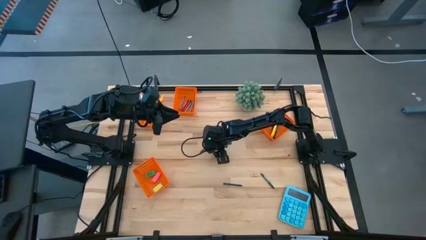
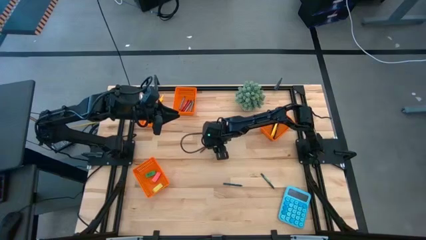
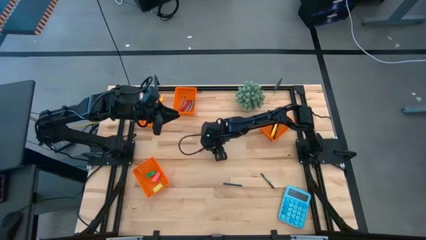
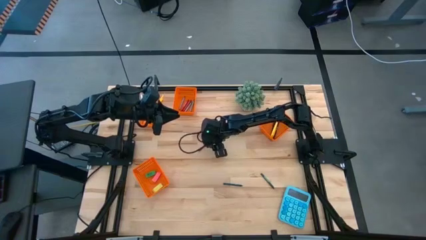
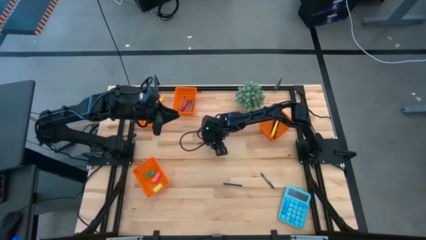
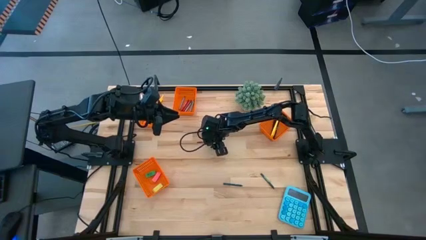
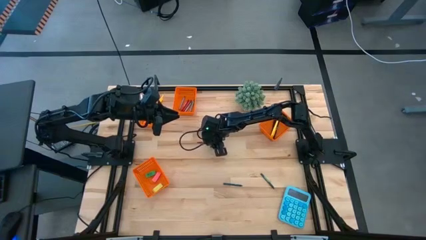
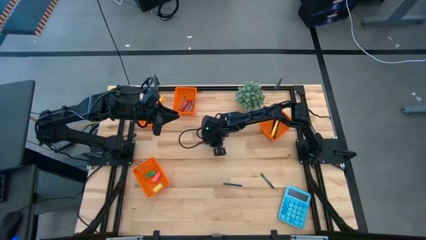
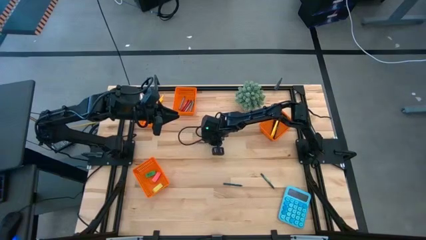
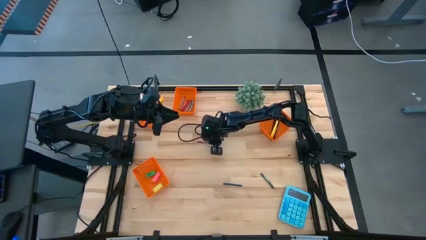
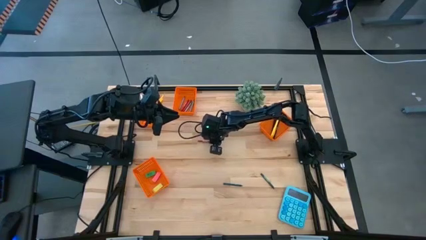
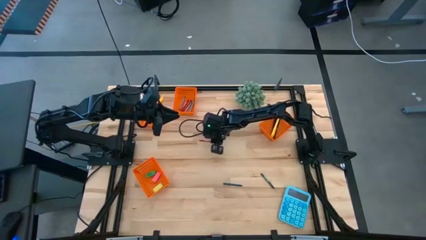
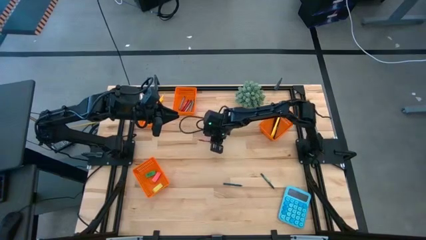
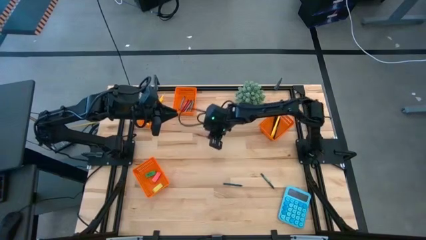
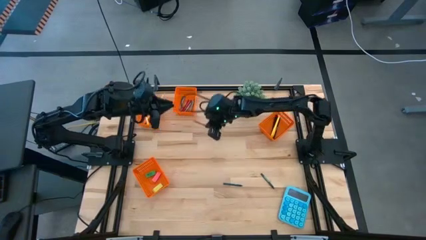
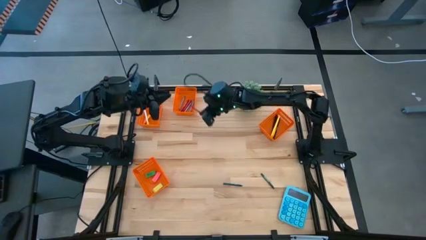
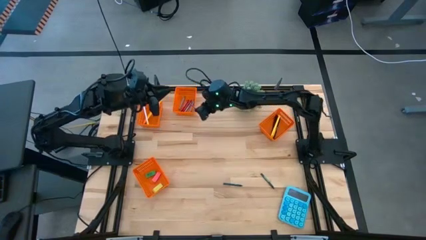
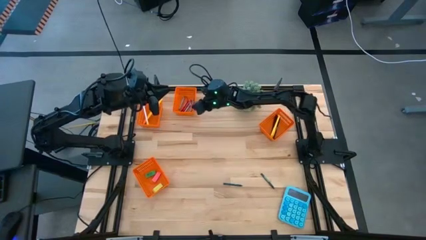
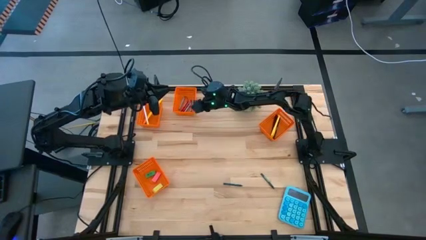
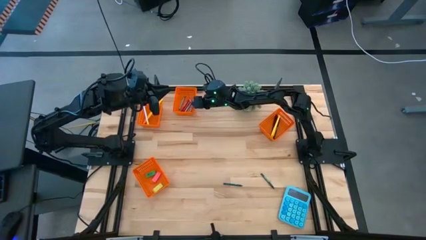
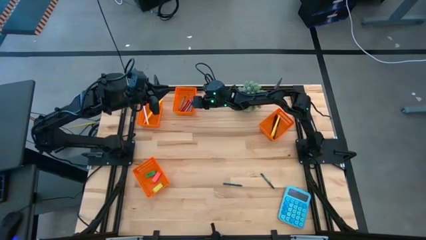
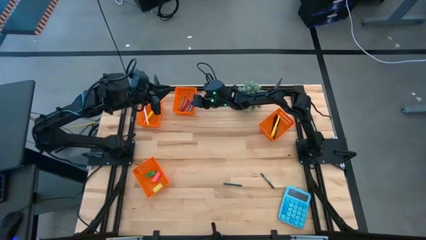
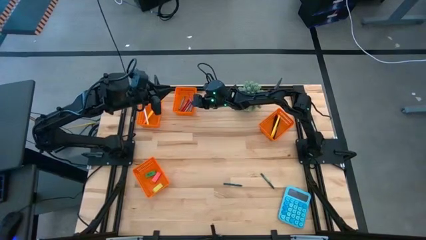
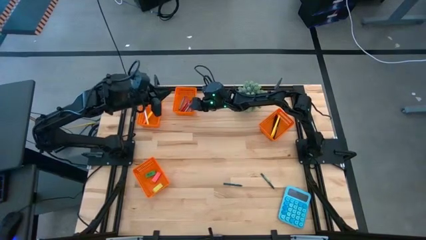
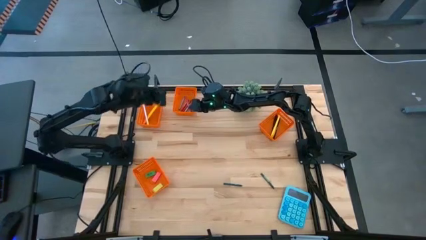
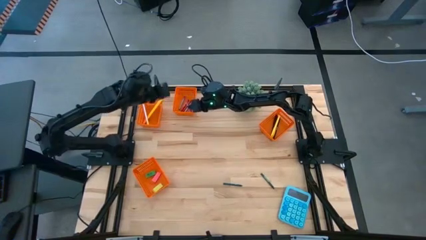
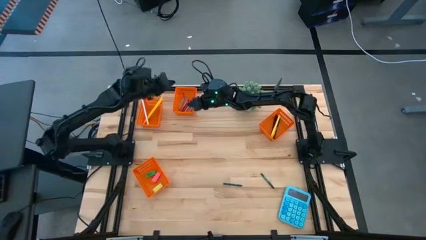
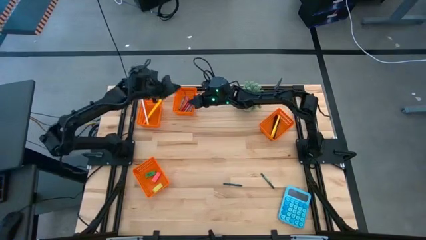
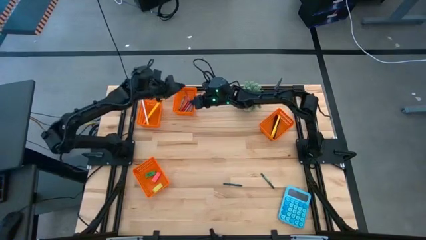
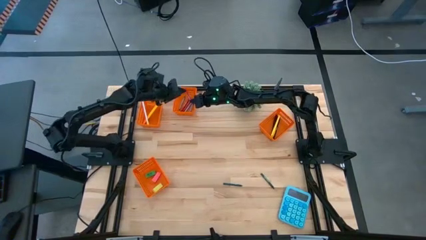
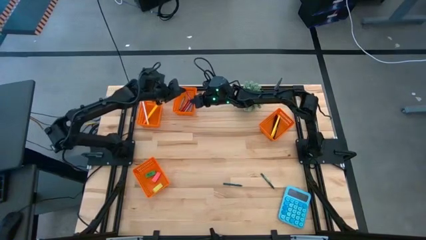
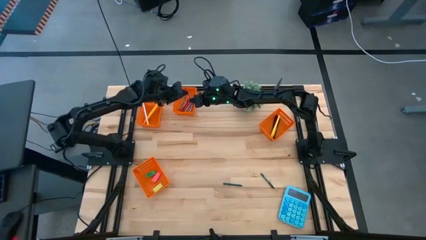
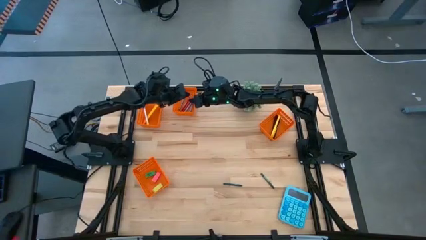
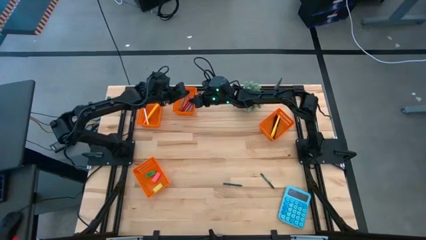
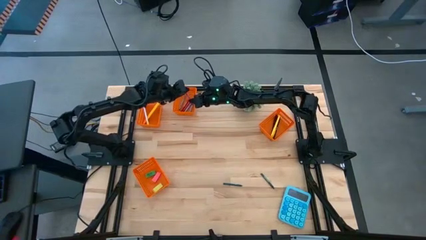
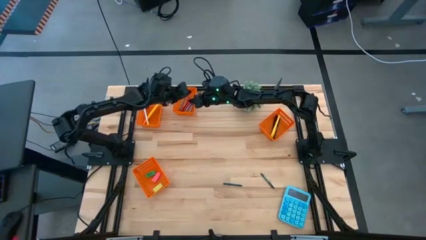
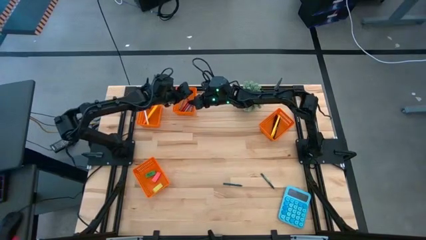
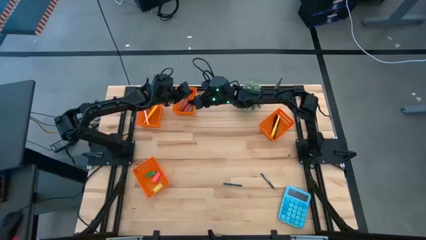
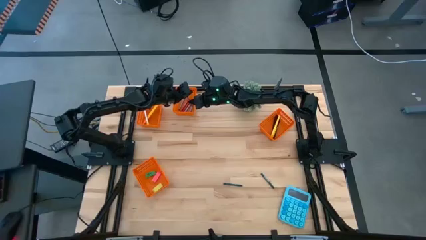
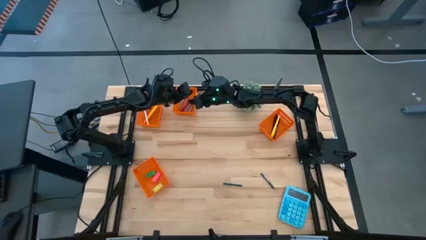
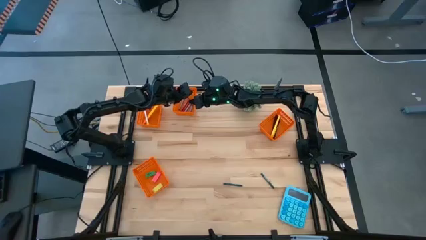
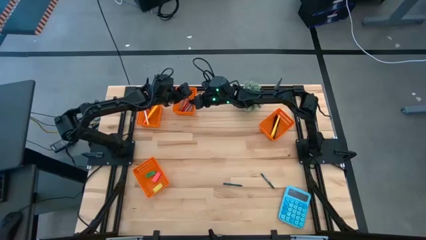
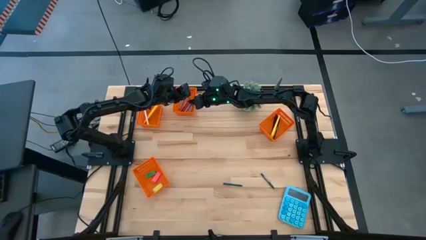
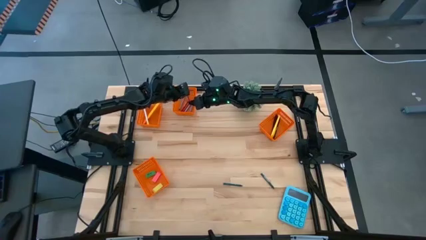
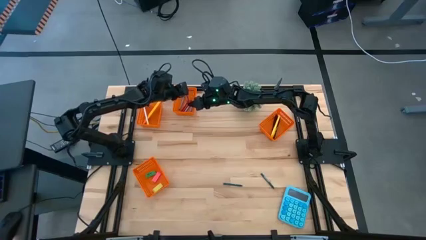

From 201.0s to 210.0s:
Task: Sort crayons/erasers/pens/pencils in bins
Put the red crayon into the middle orange bin

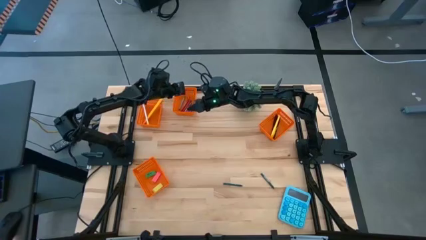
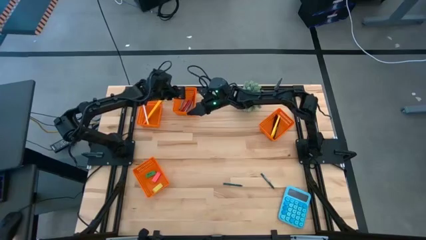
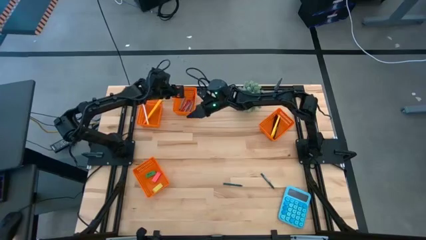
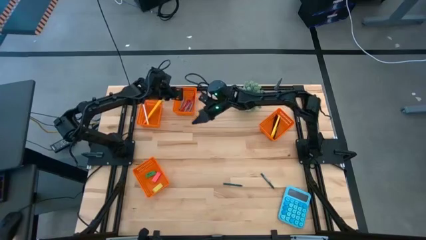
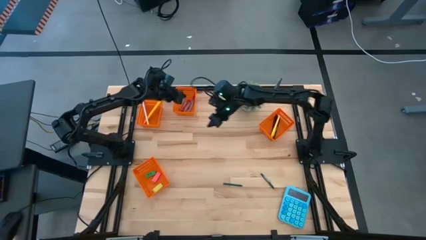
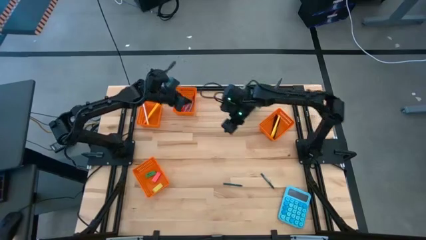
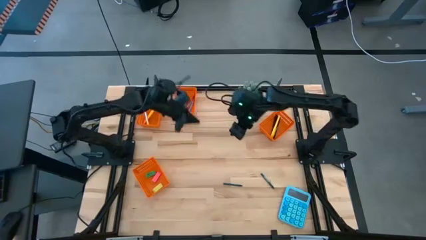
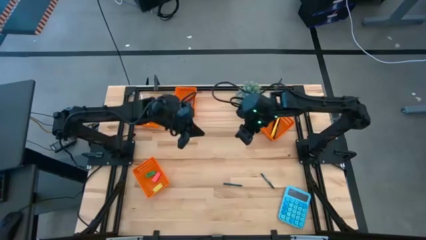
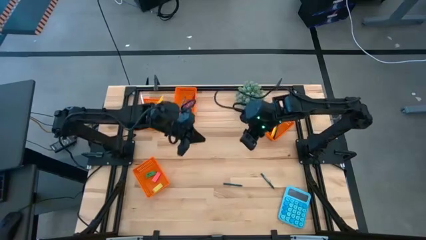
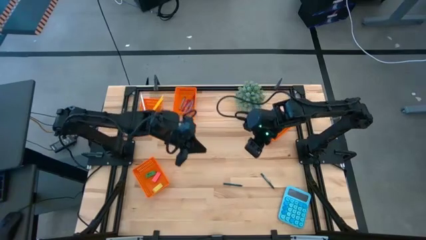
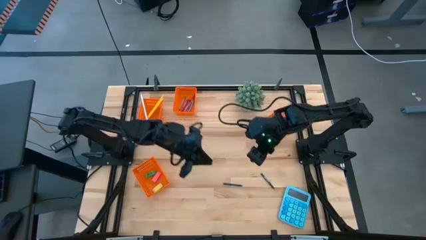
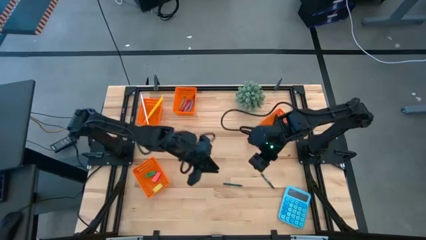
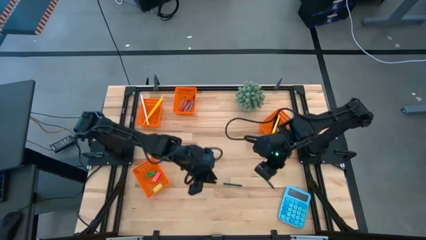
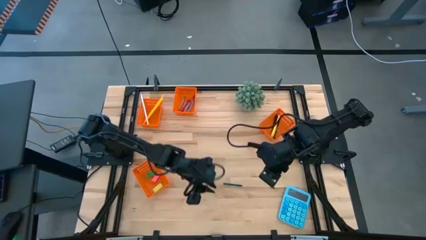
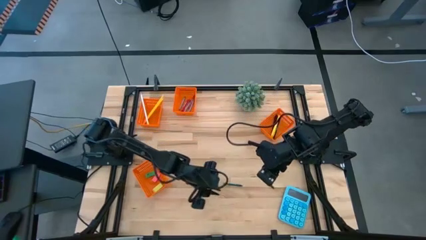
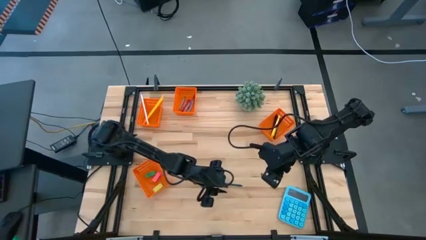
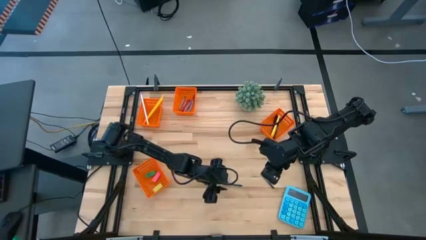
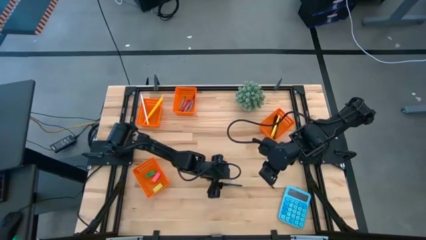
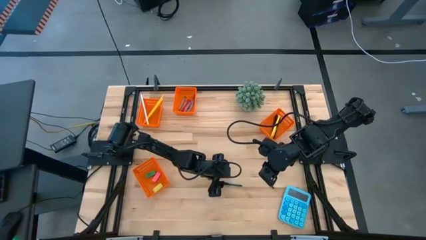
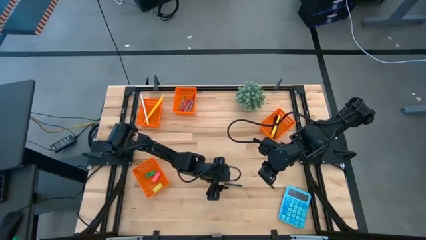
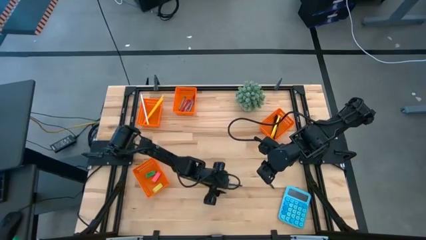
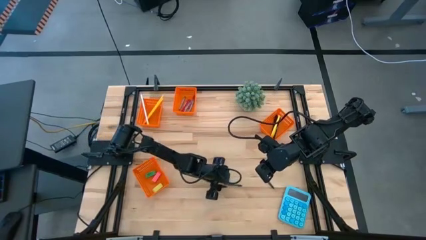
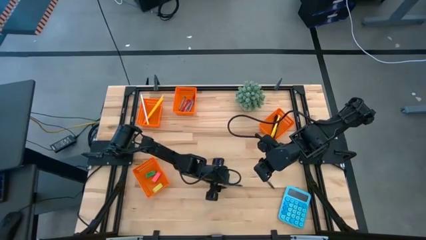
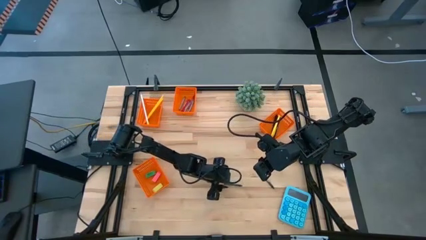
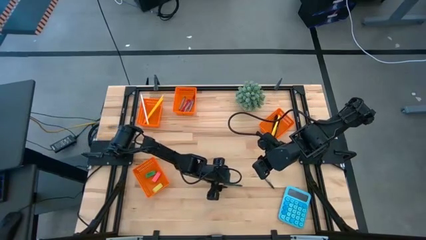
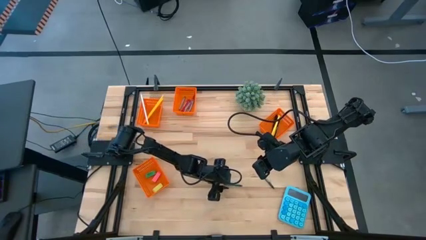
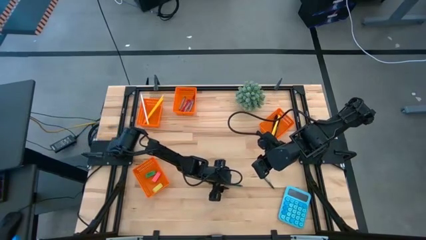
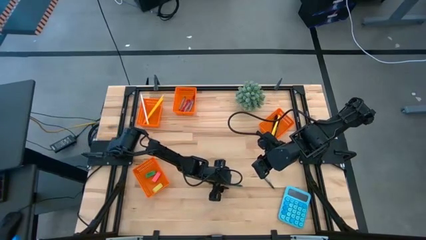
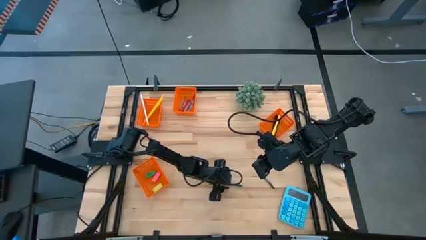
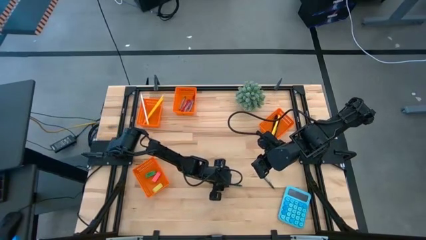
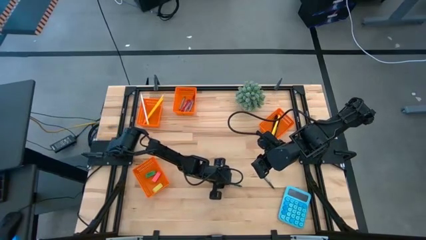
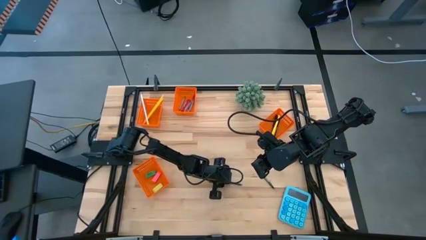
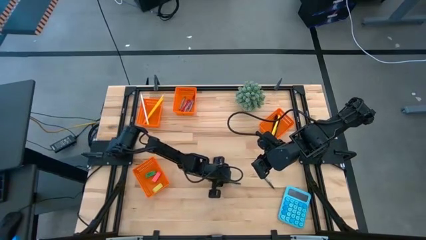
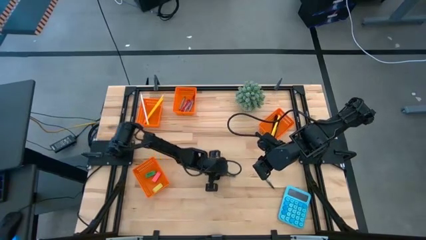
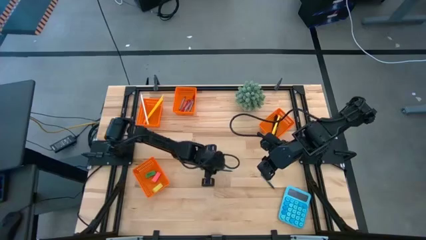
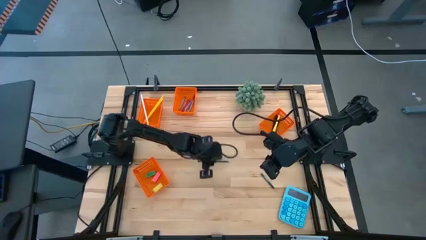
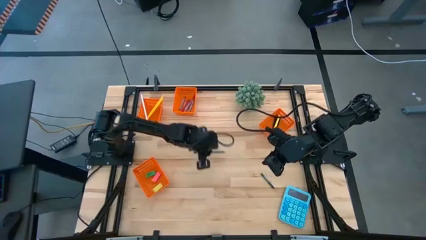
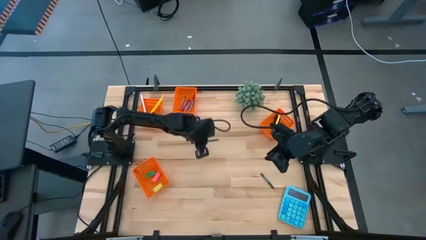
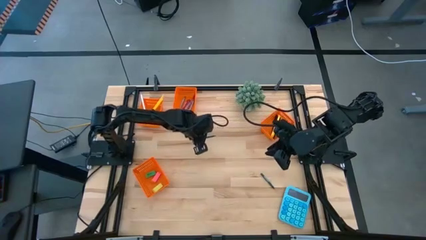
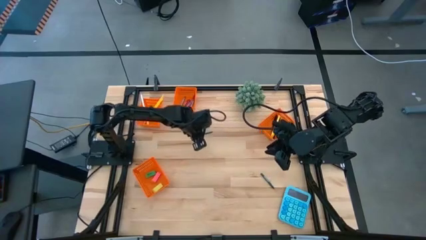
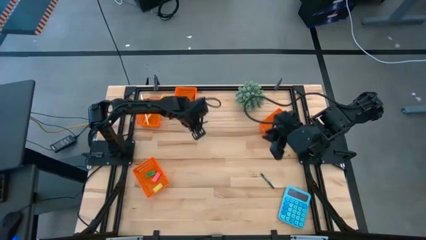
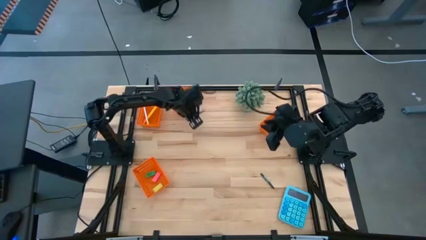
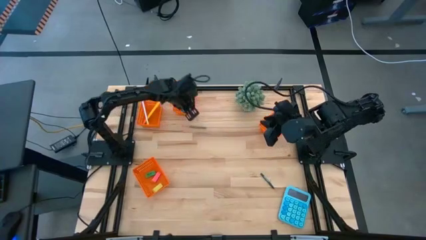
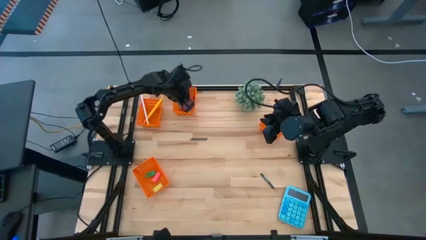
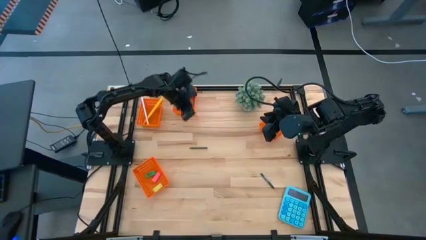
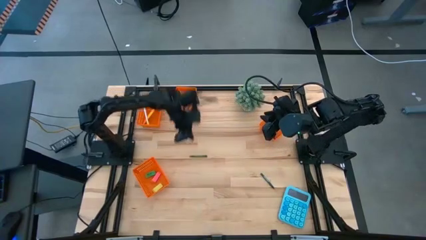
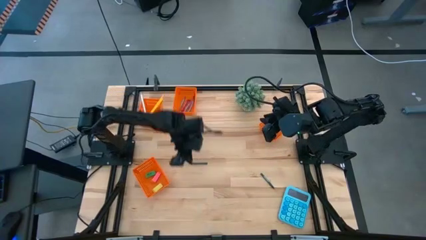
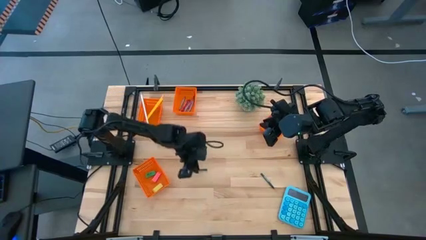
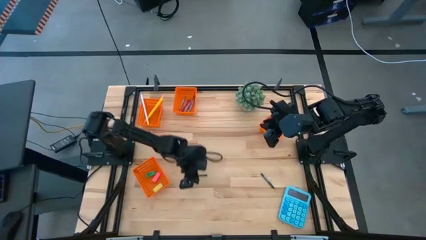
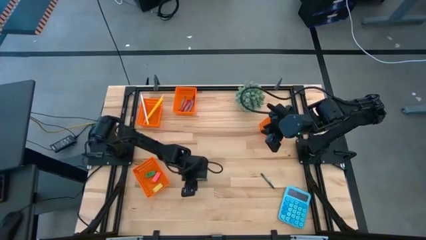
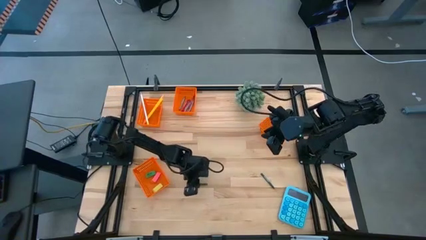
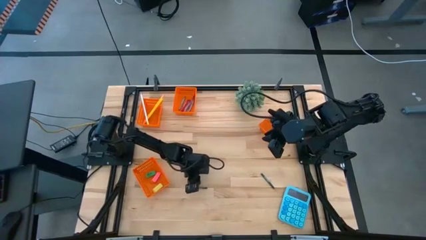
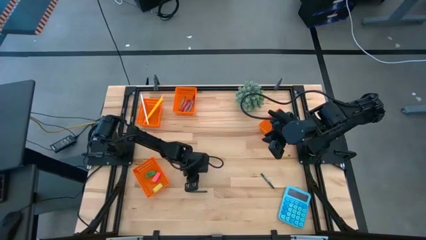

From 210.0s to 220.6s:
Put the left green crayon into the middle orange bin
